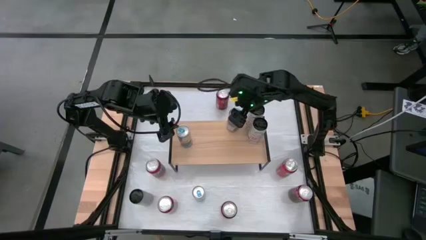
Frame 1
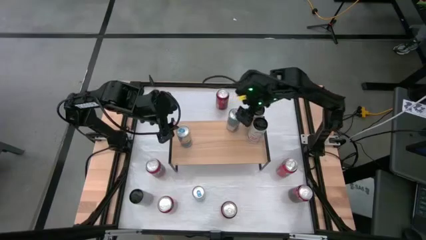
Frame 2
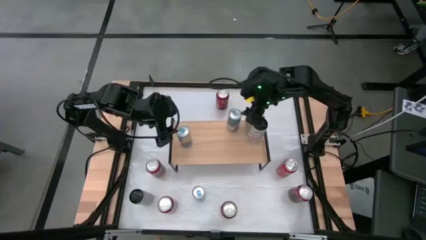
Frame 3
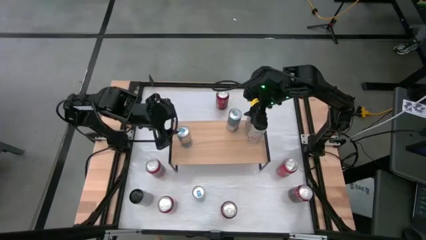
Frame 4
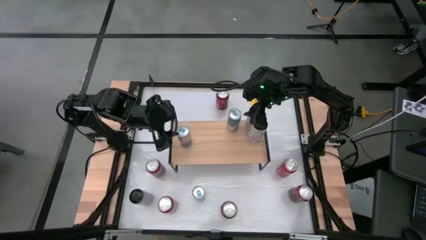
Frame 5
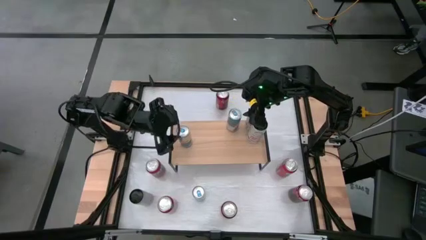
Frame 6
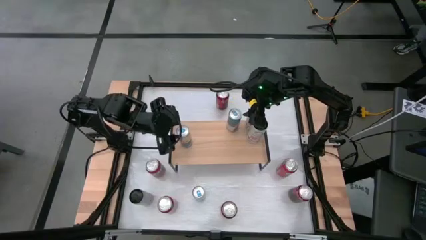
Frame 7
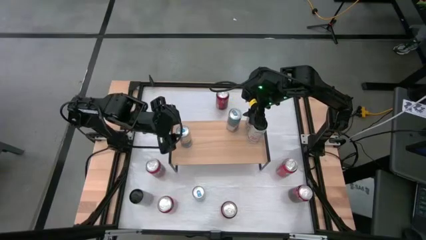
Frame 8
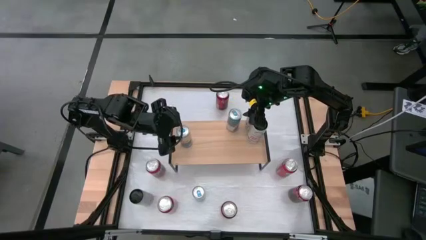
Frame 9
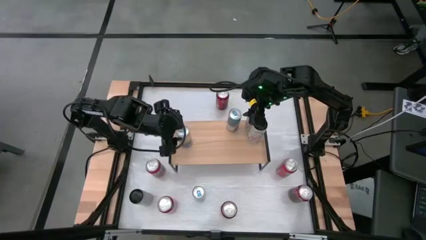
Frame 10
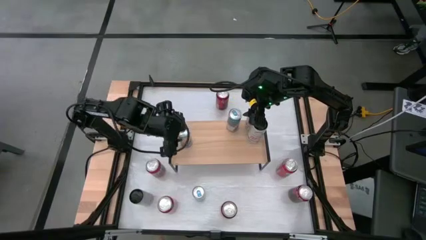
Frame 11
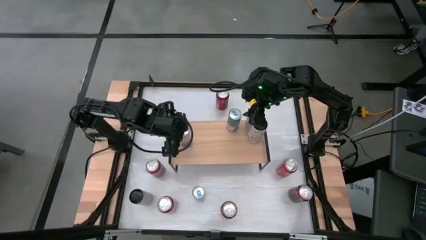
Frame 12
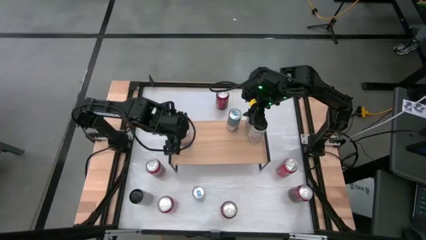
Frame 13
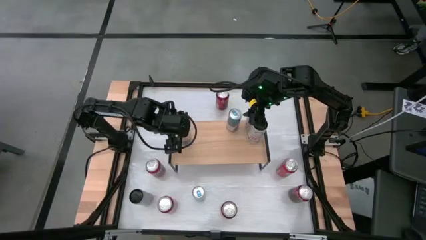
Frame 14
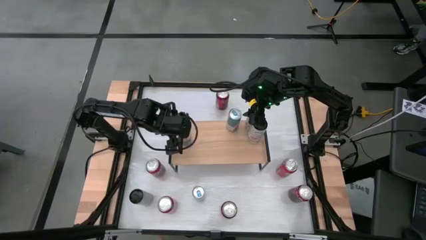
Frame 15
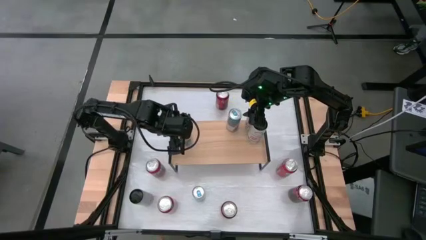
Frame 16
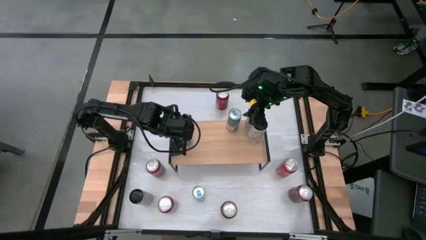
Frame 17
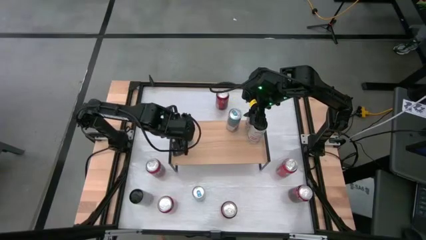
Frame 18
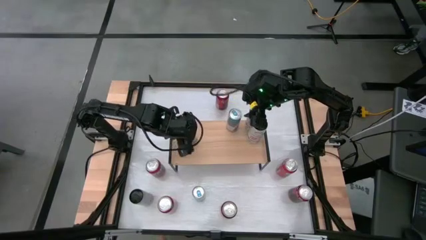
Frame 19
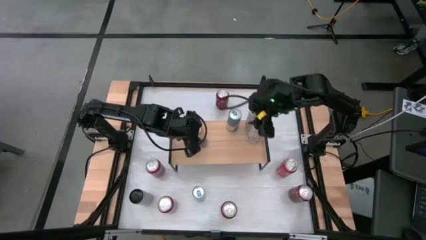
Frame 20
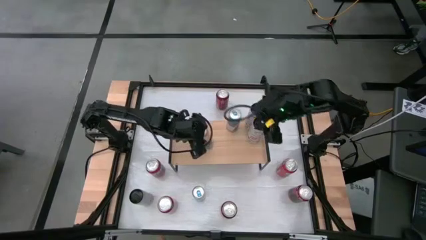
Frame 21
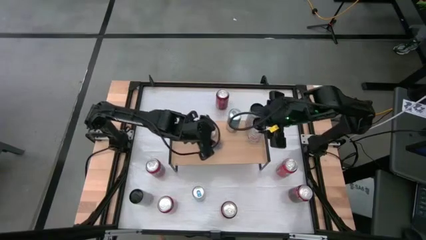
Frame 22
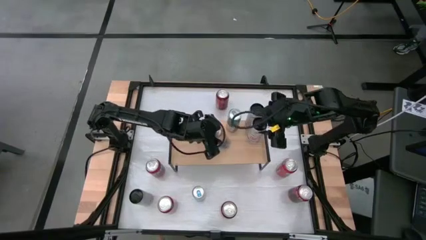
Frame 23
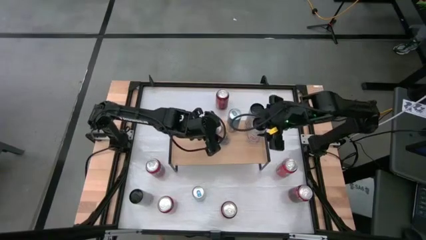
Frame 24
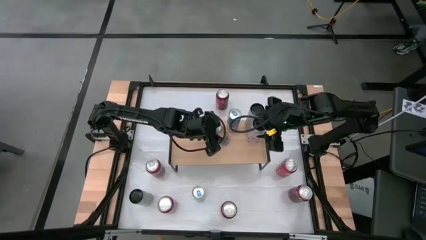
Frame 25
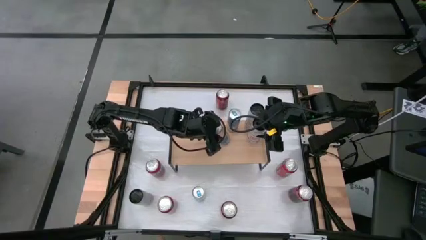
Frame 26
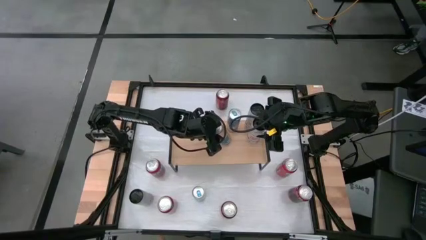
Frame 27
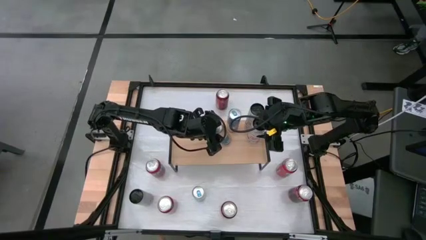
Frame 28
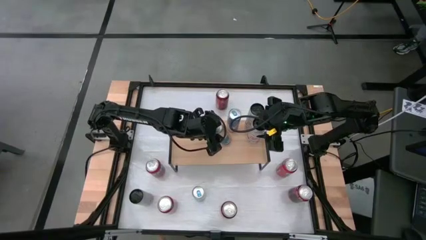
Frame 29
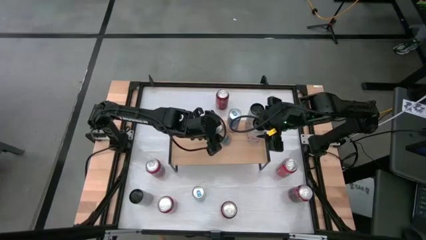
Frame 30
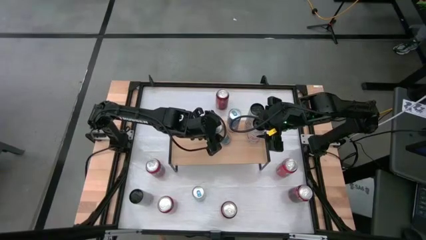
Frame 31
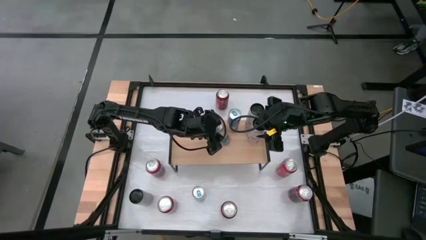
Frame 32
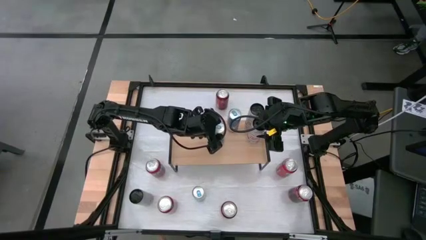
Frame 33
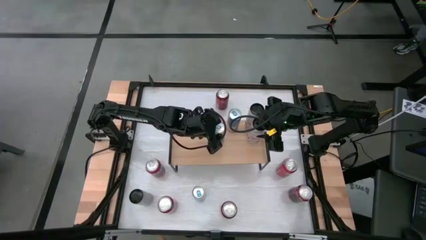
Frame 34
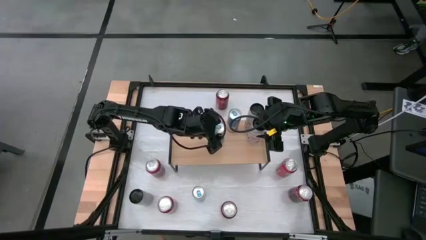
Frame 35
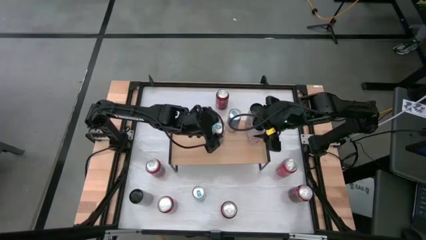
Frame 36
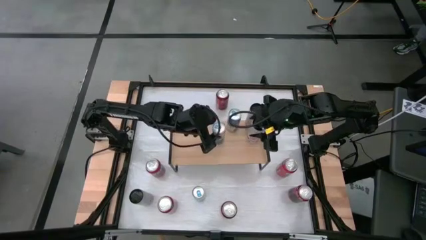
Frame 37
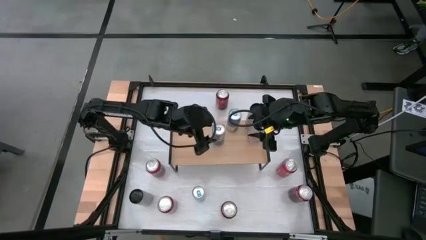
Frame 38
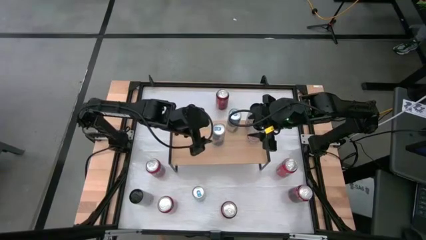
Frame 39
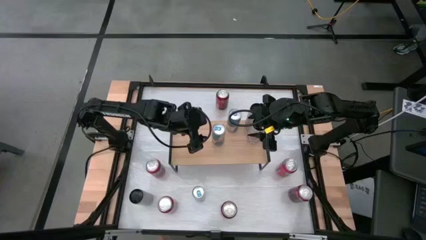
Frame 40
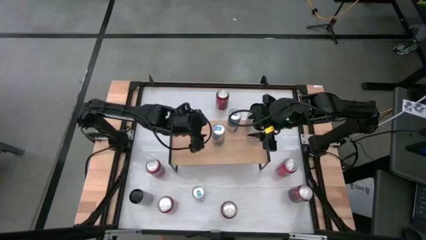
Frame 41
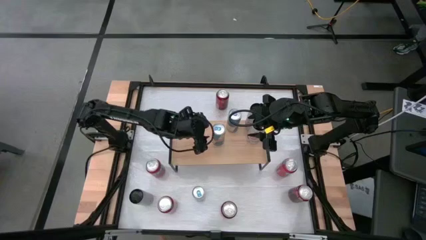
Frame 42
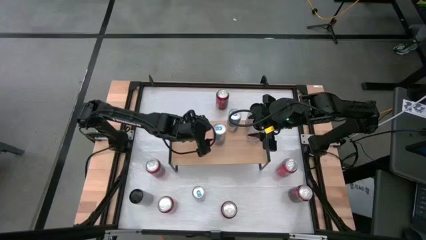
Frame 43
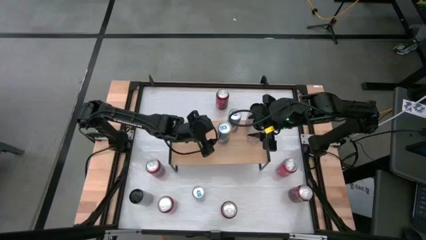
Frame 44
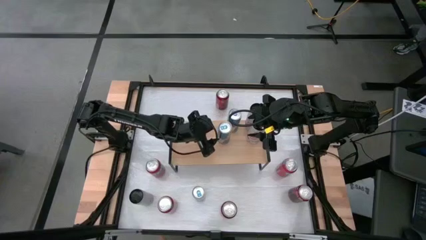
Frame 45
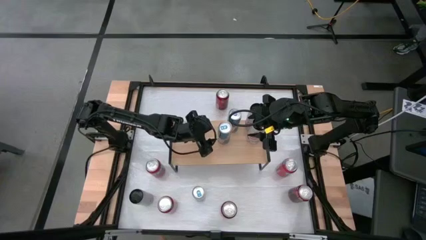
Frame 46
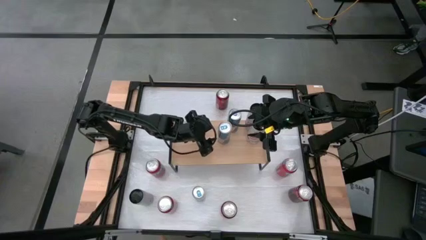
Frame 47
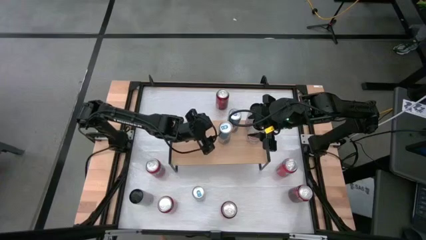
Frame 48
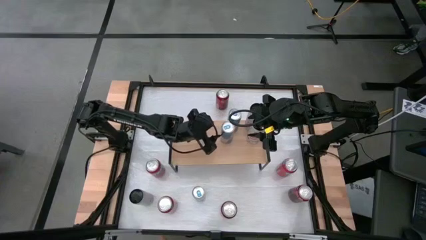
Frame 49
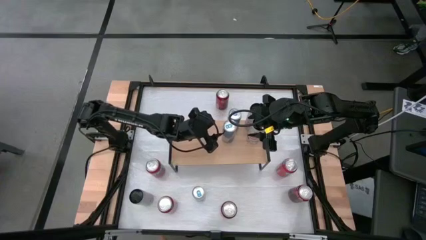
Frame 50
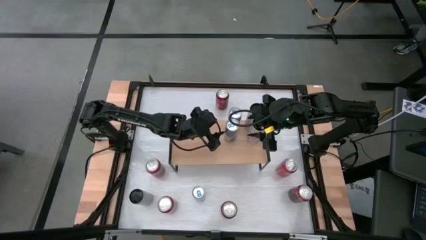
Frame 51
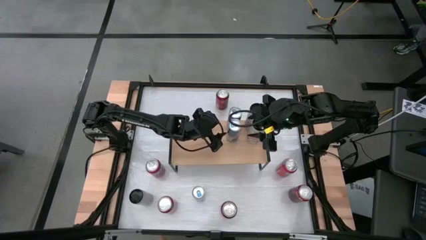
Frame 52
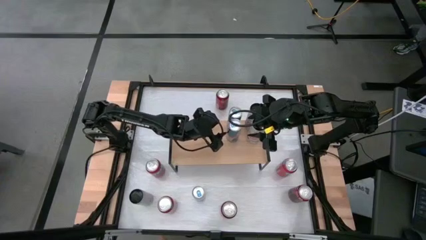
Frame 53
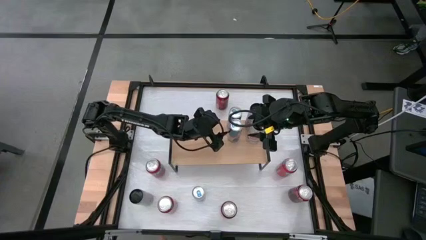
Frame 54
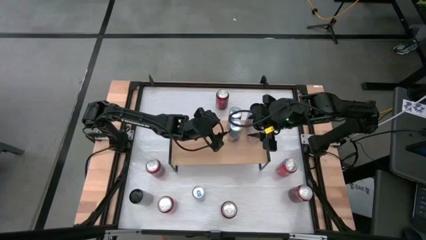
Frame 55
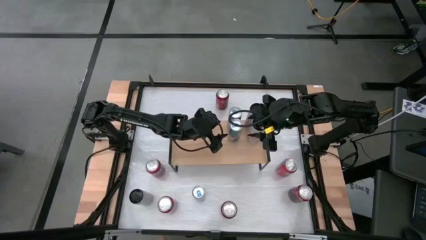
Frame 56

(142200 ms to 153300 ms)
Task: Place canned beverage on shelf
Move the left blue soda can on the shelf aligned with the other blue soda can

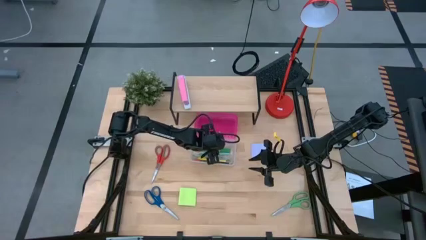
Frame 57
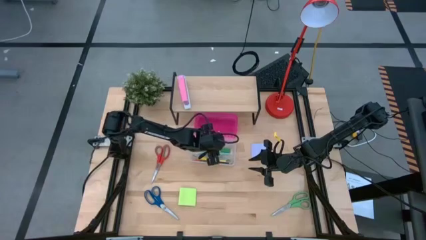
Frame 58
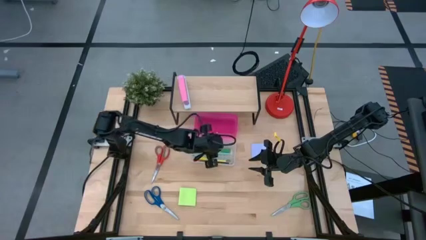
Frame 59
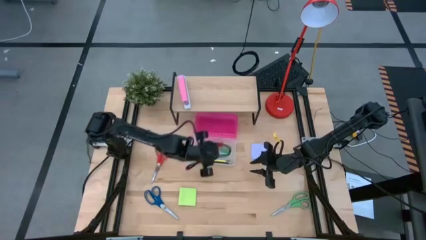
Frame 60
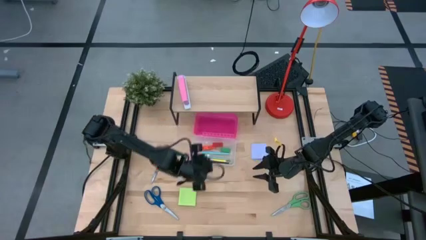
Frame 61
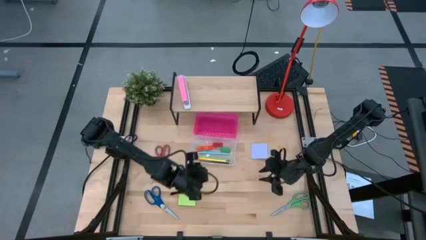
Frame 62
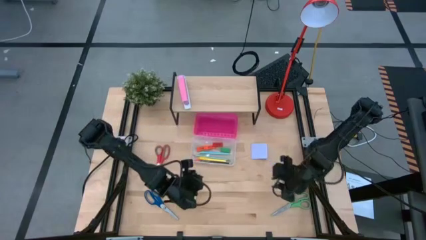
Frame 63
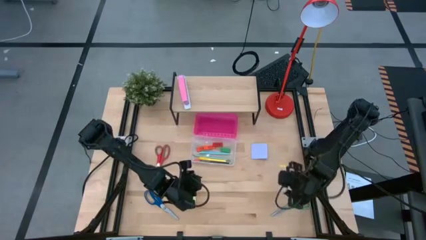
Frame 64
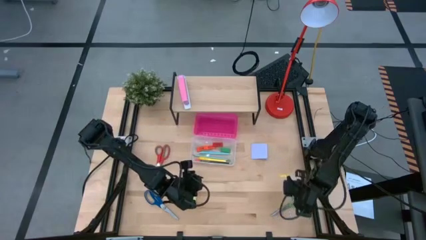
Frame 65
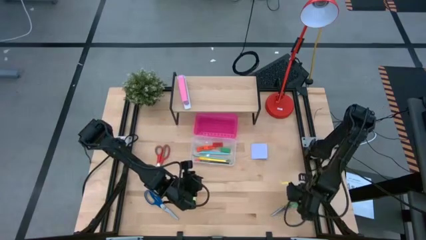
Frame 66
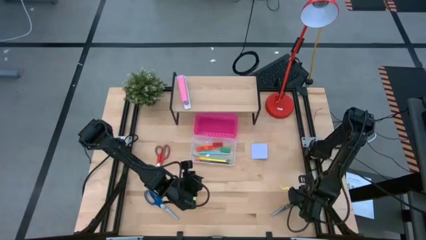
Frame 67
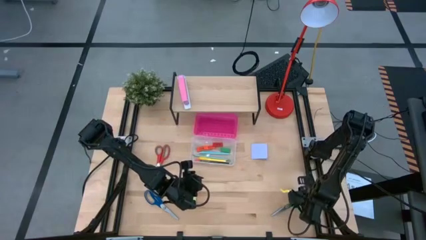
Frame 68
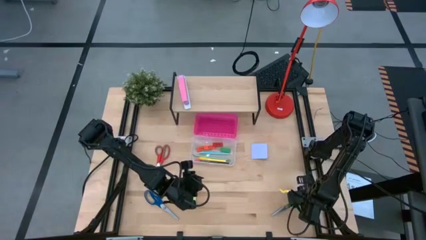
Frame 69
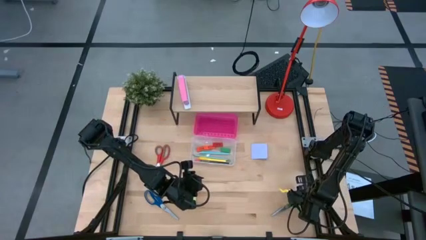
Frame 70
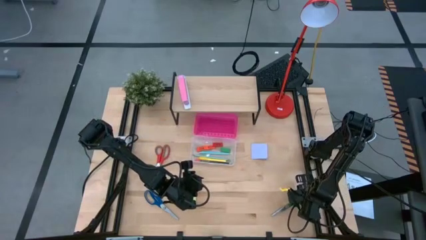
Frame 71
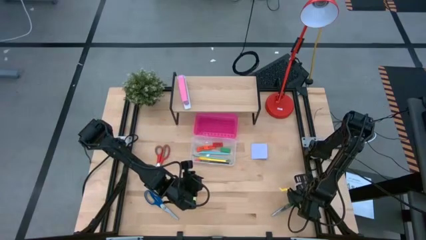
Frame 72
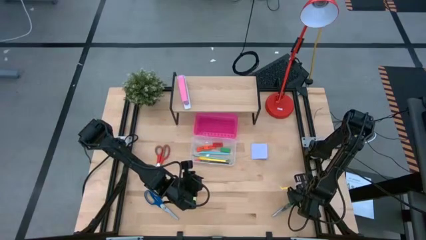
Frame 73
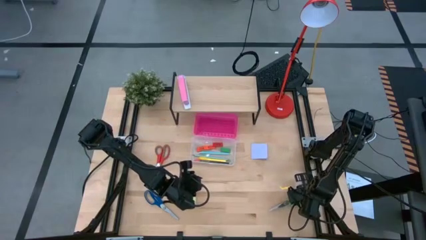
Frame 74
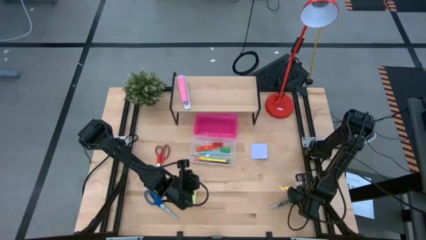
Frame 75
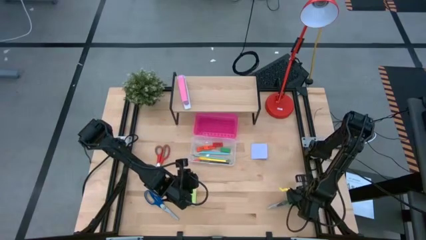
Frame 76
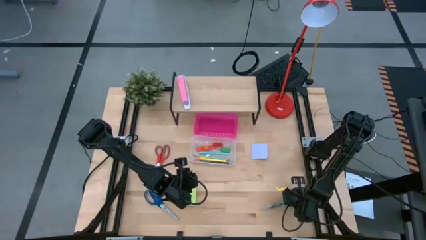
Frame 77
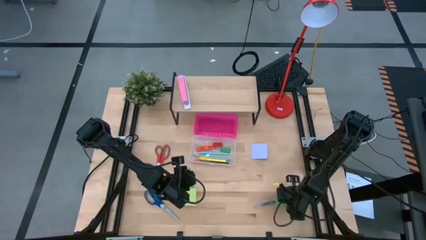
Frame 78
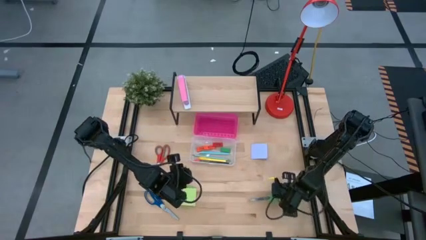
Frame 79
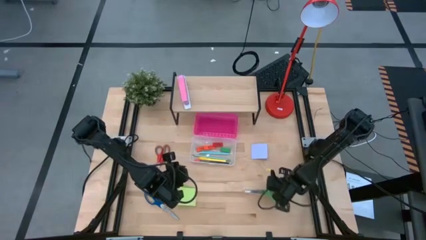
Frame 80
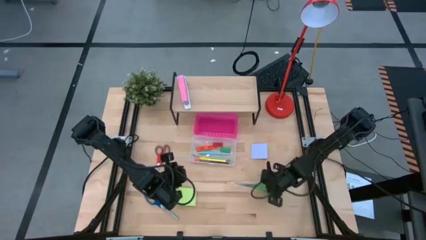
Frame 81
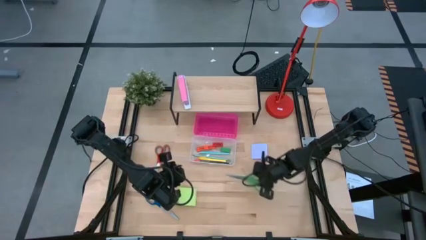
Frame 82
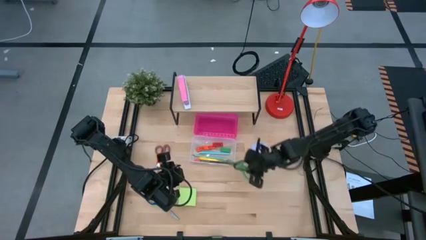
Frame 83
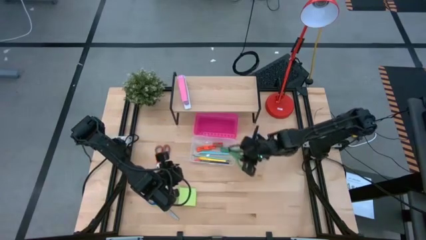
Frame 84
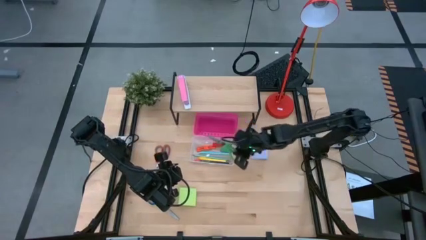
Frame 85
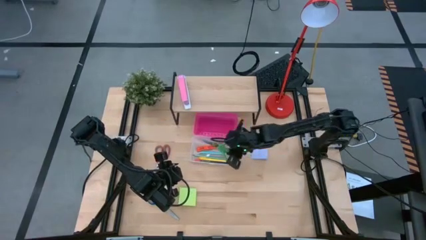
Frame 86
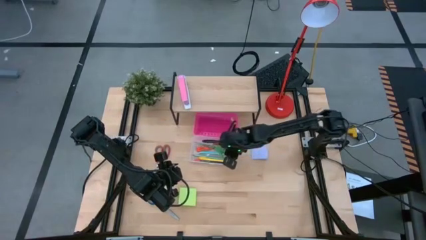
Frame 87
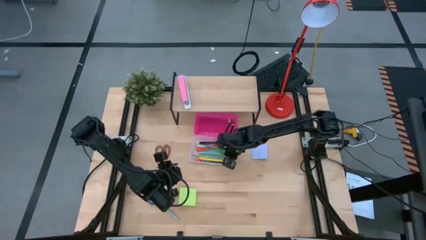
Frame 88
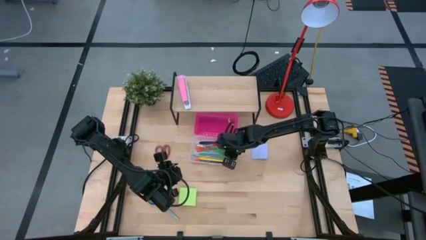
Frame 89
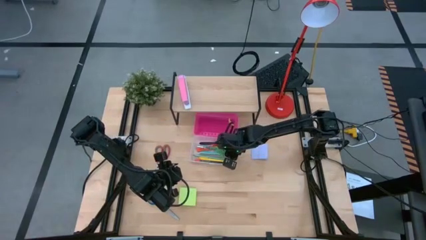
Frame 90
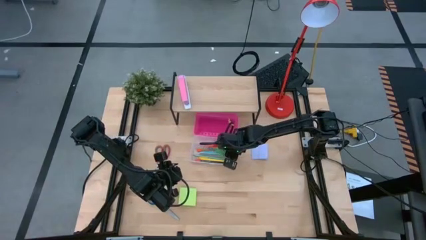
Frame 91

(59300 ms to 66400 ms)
Task: Pack school essentials
Put the green scissors into the supply box
